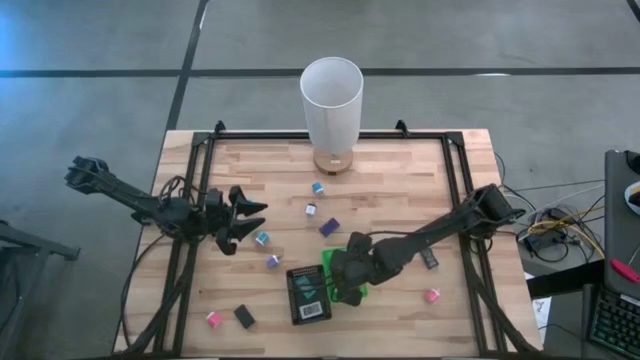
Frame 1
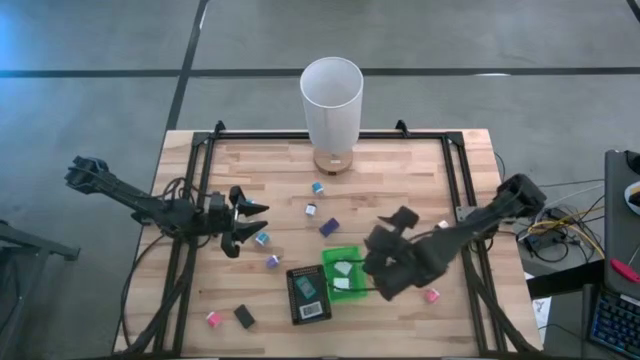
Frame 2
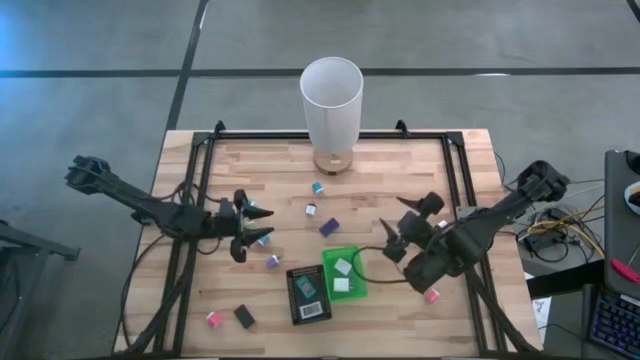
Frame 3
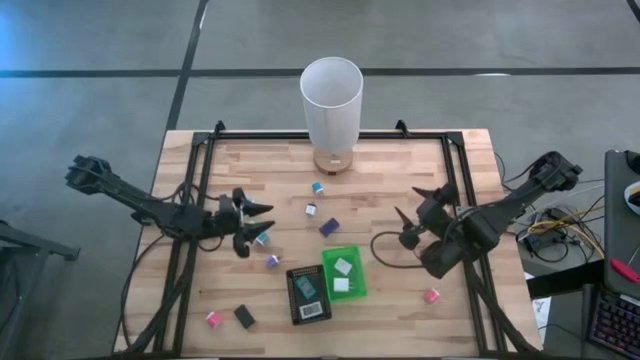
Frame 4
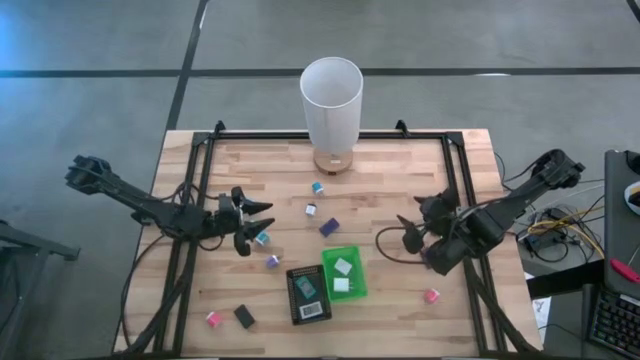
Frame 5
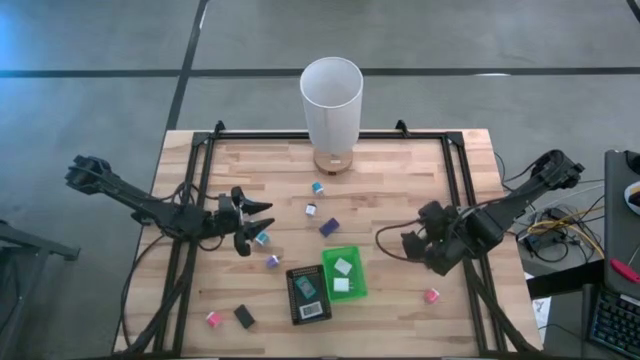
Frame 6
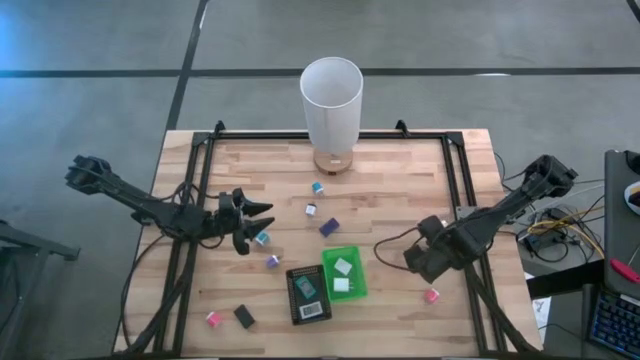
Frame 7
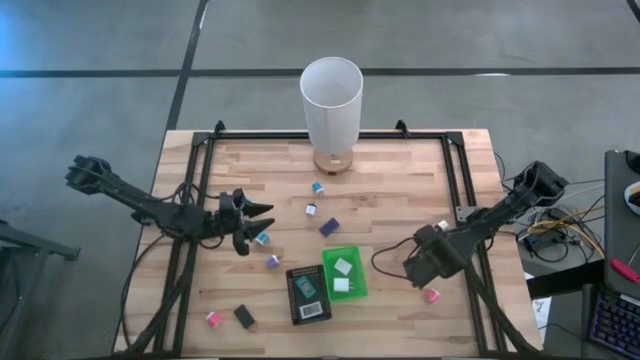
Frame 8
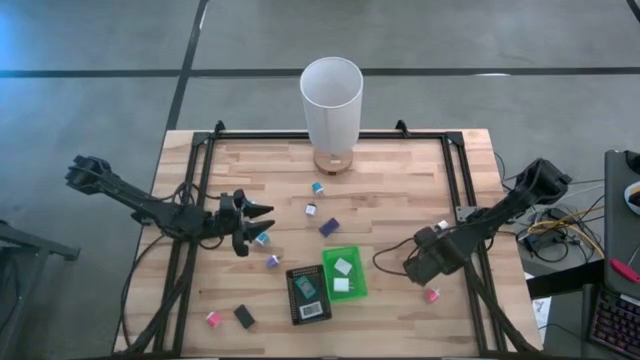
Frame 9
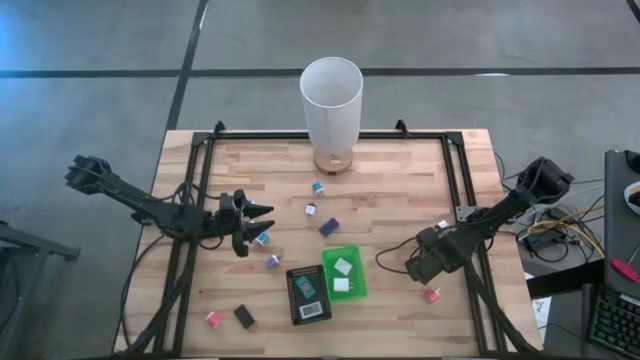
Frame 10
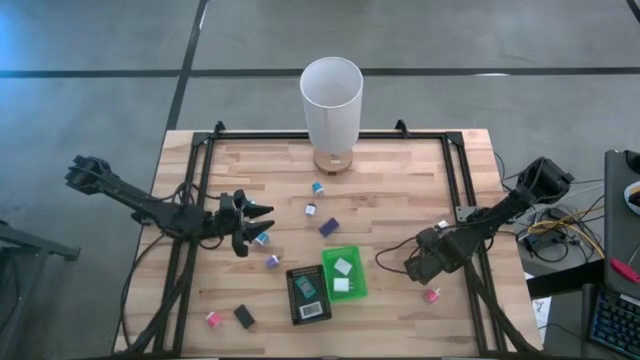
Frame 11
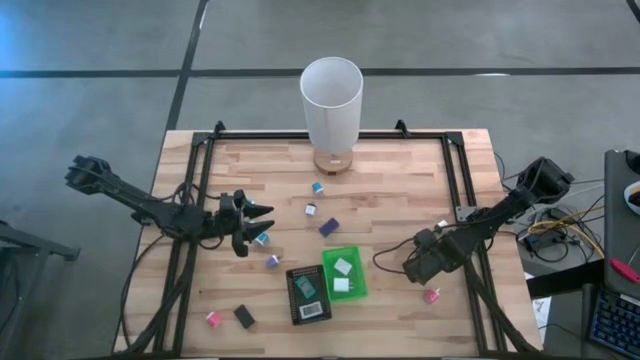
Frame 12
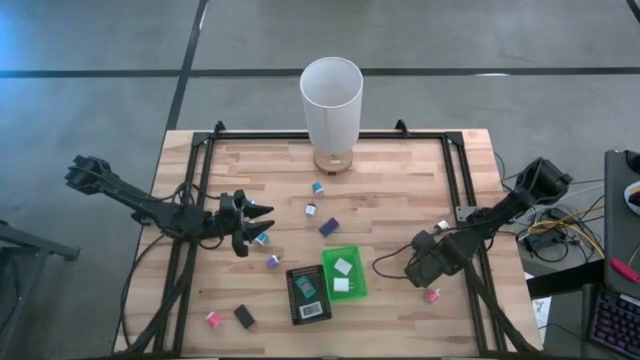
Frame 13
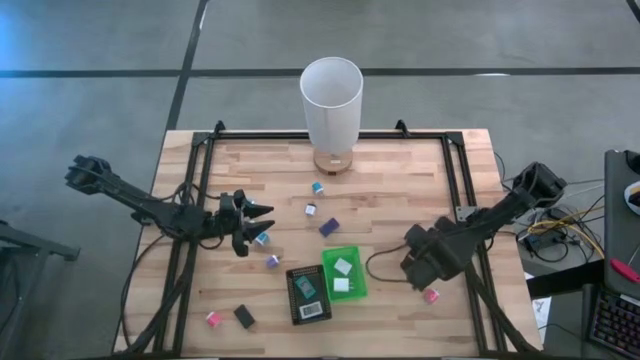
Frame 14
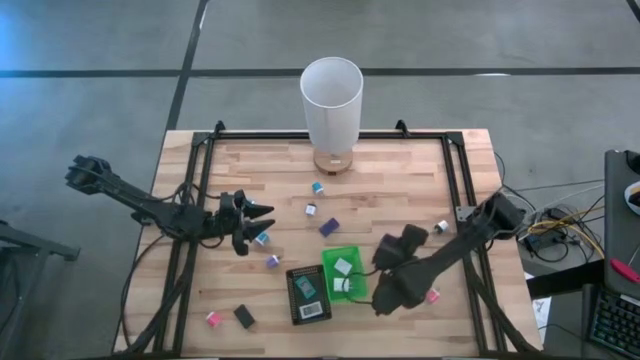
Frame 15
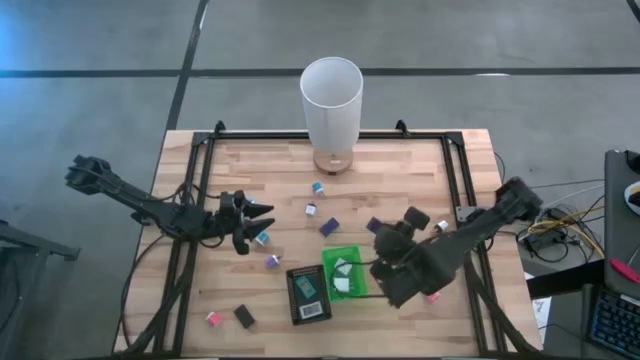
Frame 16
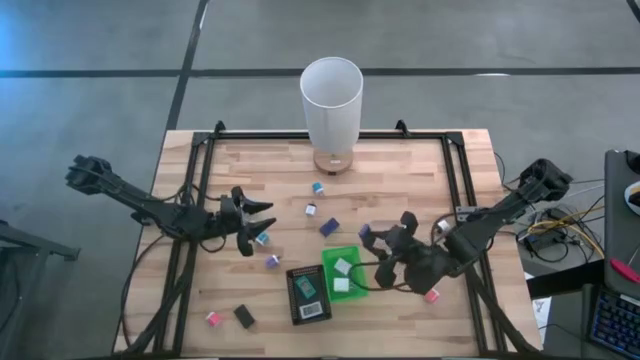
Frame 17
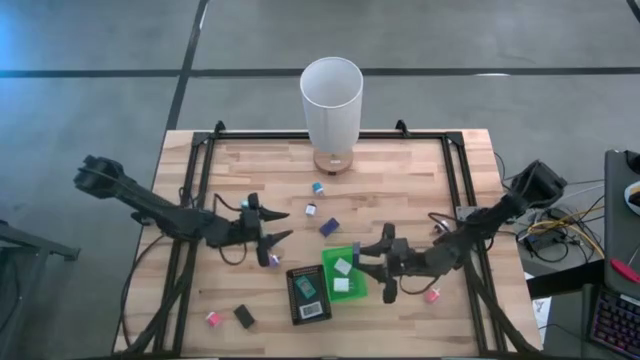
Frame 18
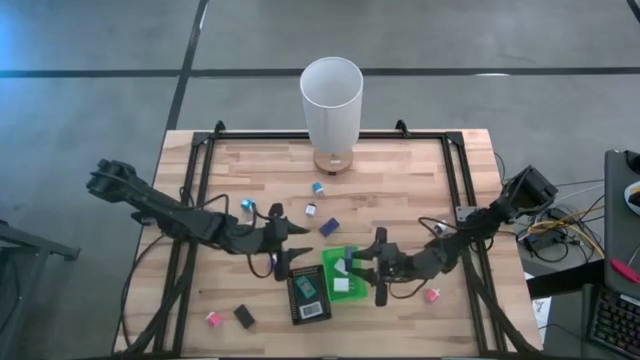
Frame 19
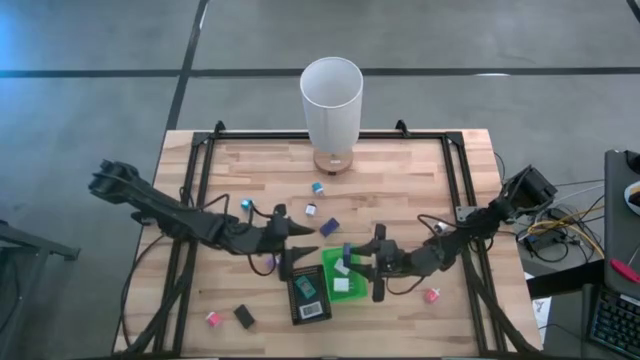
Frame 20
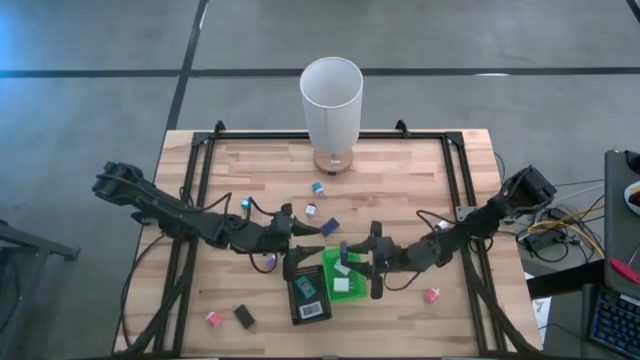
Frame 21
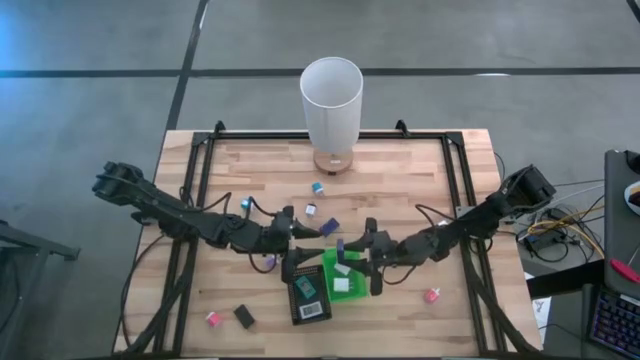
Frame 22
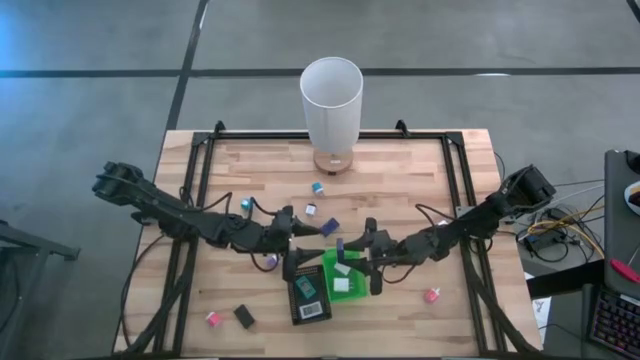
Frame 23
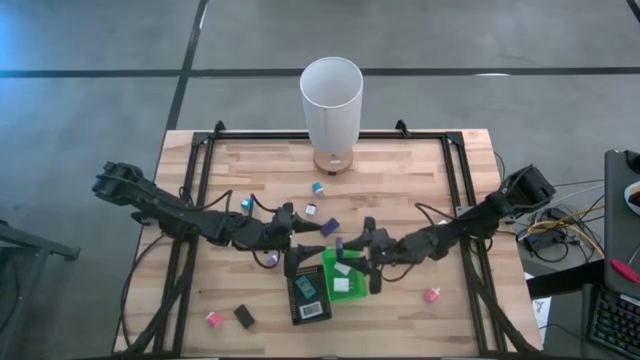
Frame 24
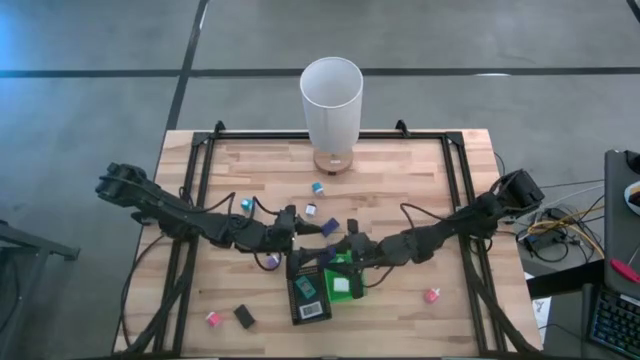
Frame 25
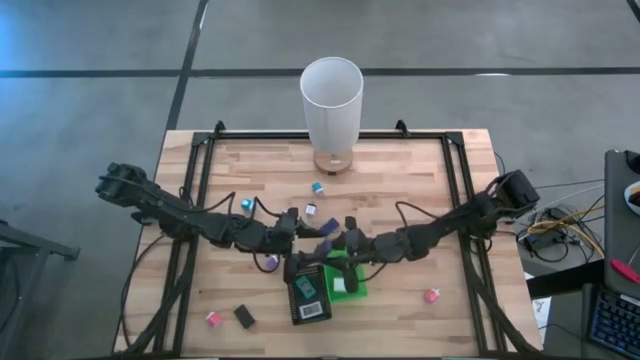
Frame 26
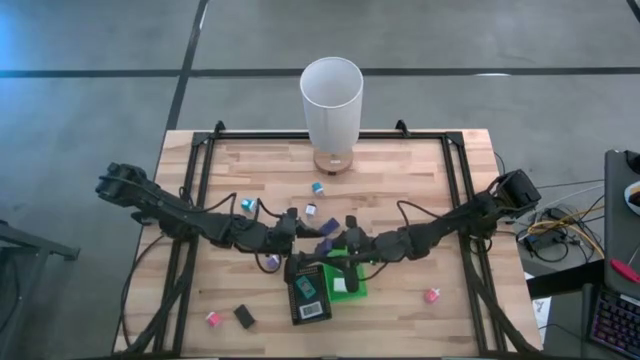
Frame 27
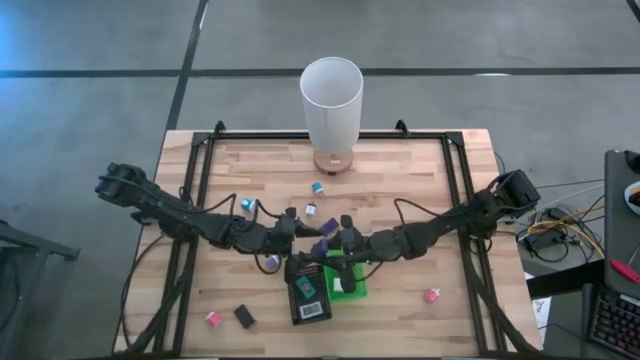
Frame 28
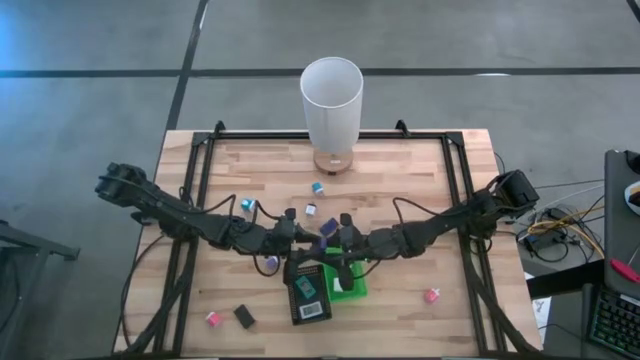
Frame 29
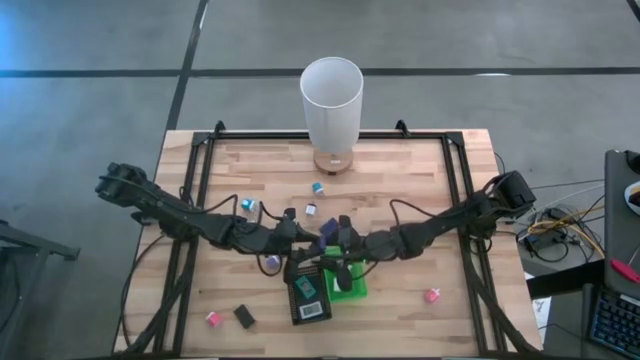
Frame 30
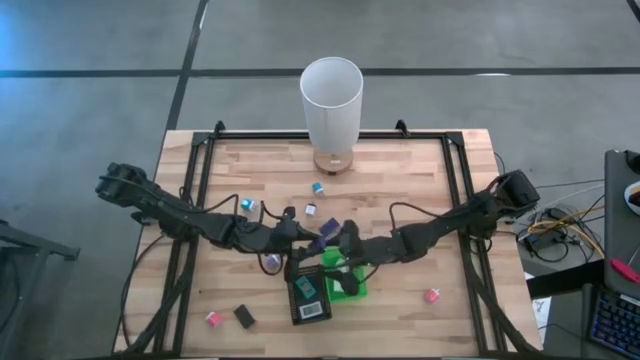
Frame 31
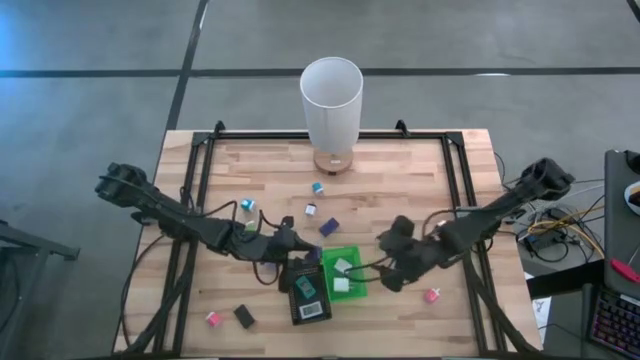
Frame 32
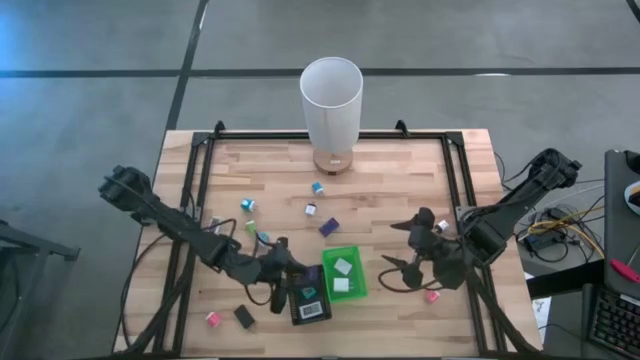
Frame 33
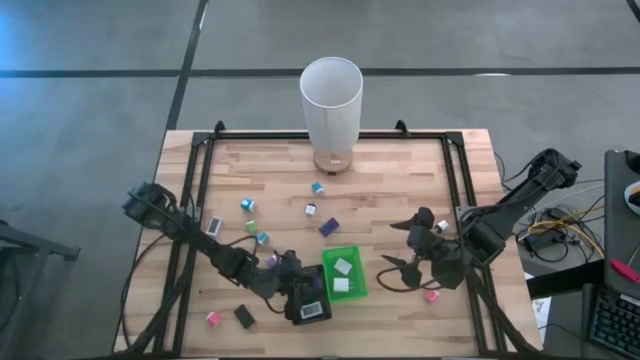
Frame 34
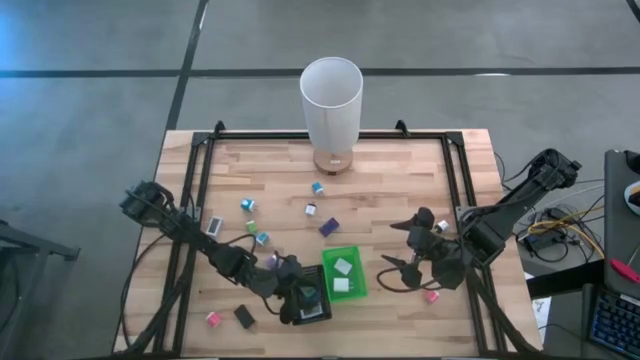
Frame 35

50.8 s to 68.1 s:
Task: Pick & Place Office items
Put the right dark blue digital clock into the black bin

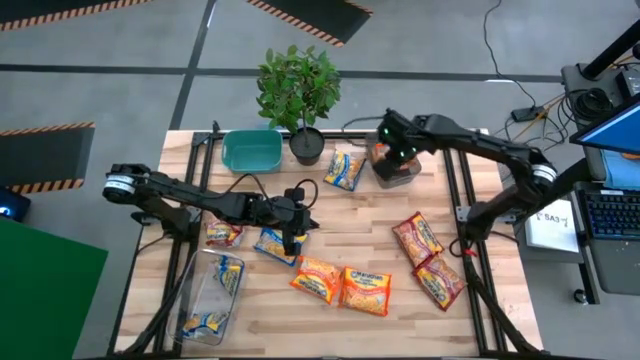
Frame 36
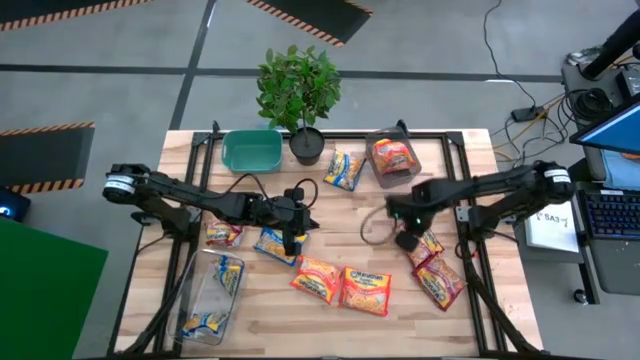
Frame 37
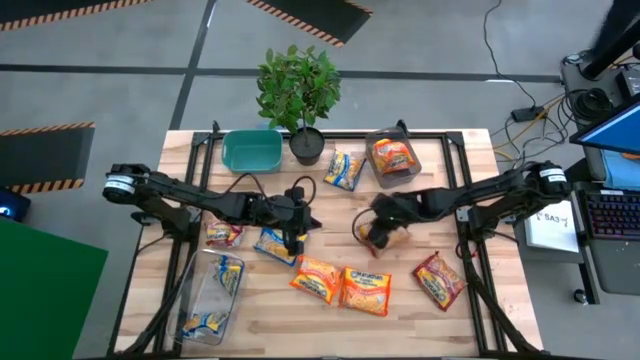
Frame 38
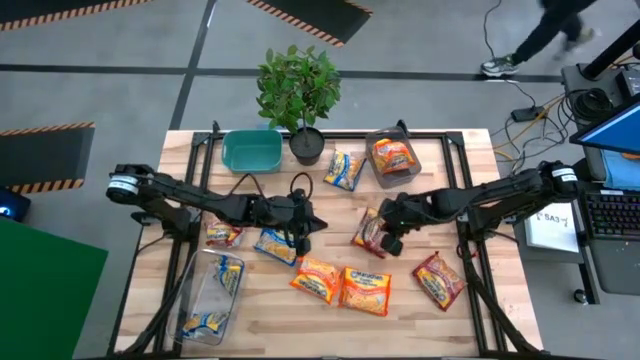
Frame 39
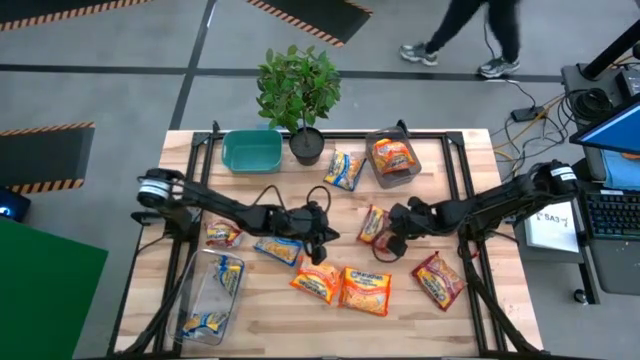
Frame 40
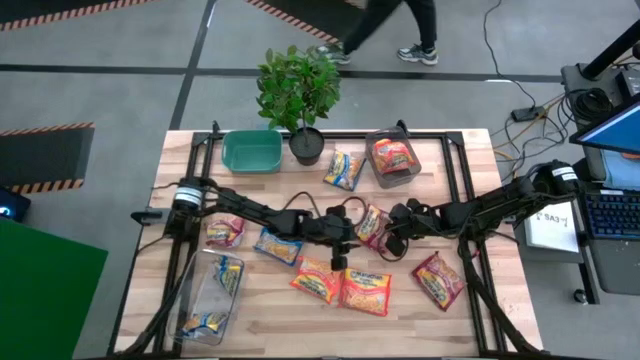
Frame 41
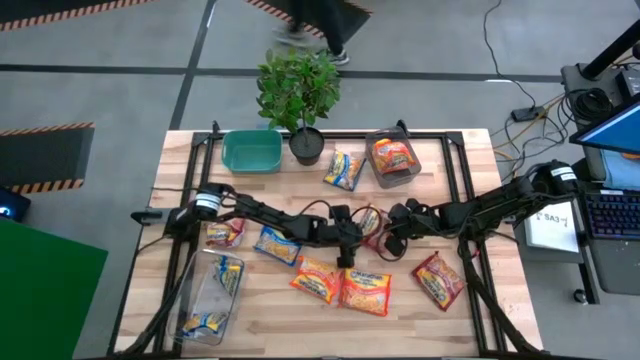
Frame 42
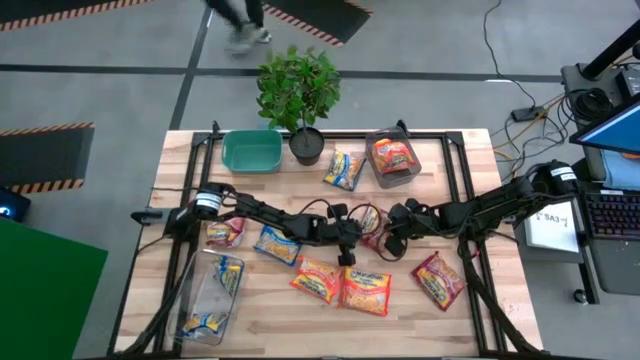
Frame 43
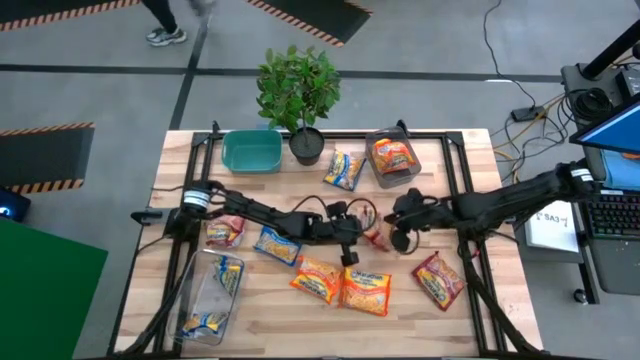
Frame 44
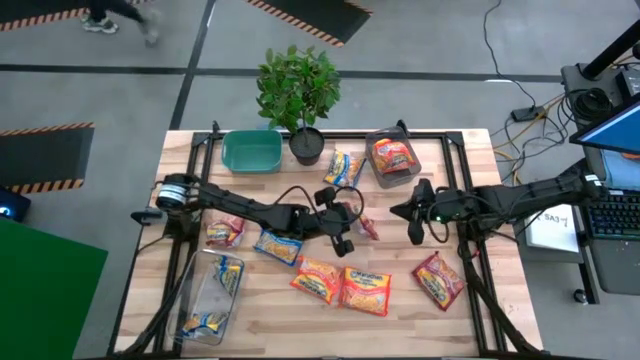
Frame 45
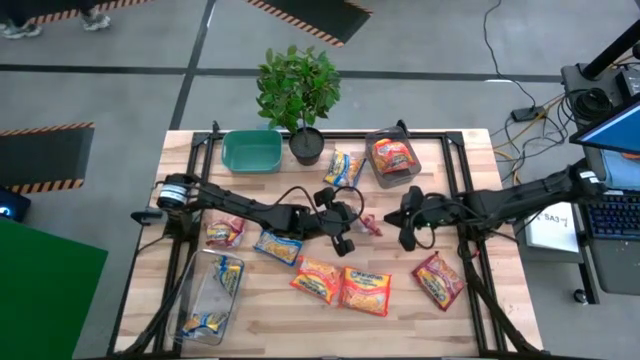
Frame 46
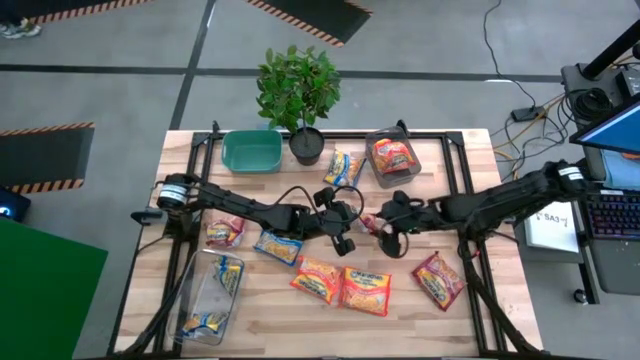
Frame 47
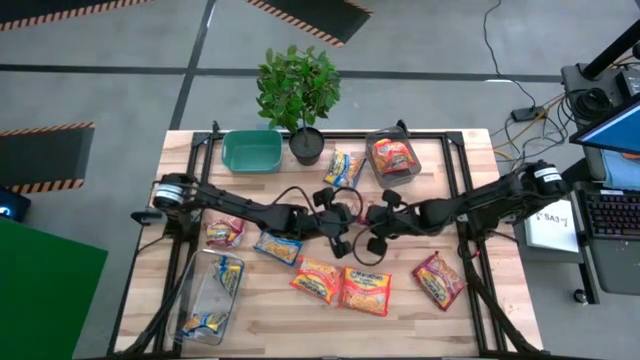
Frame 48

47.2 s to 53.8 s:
Task: Sort Maruchan noodles
Put the red noodle pack into the green bin
